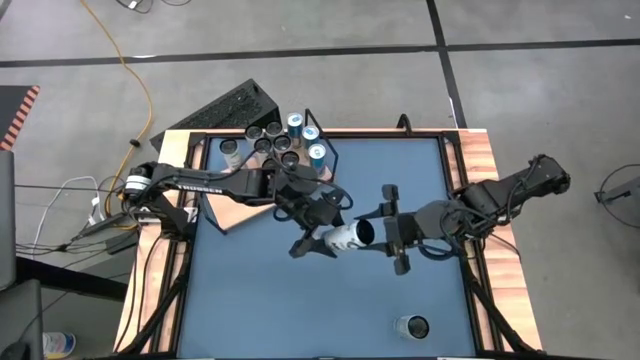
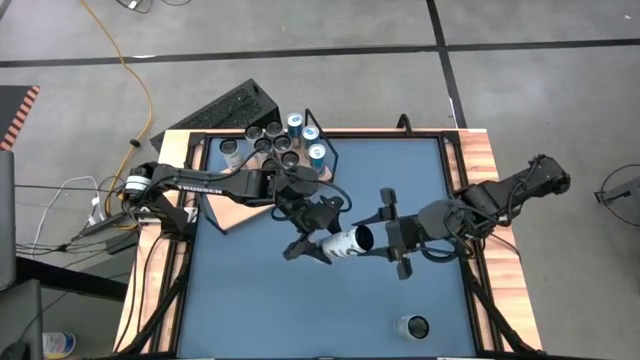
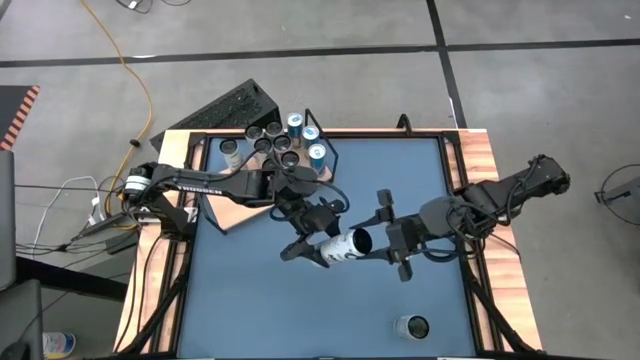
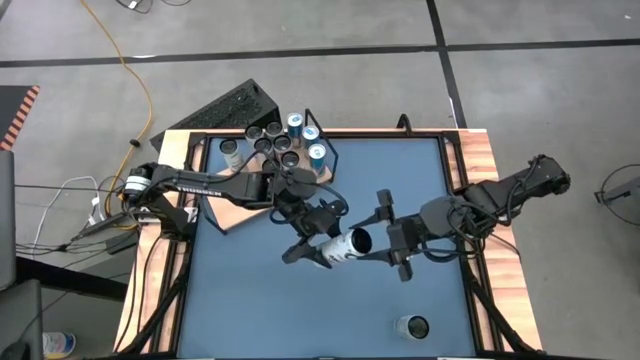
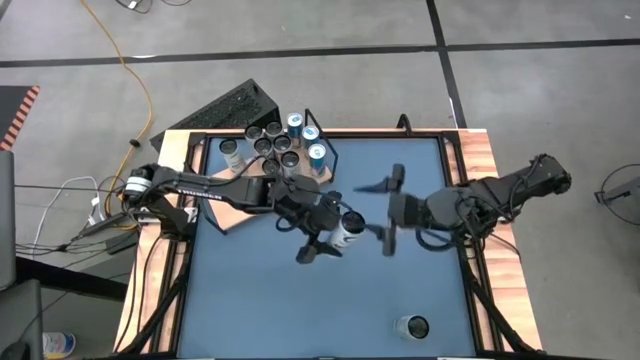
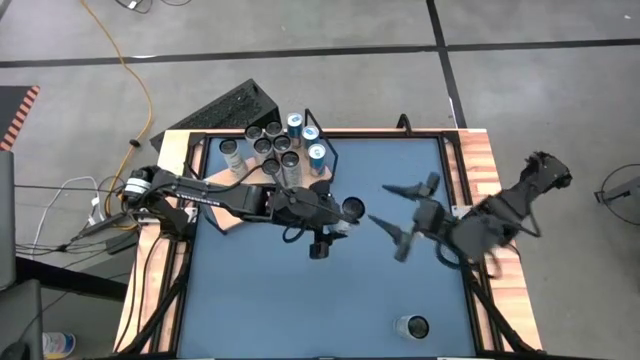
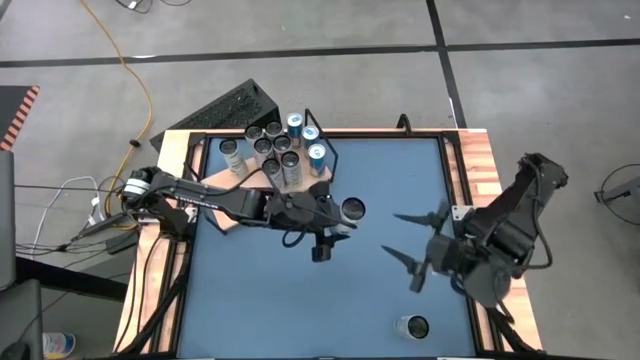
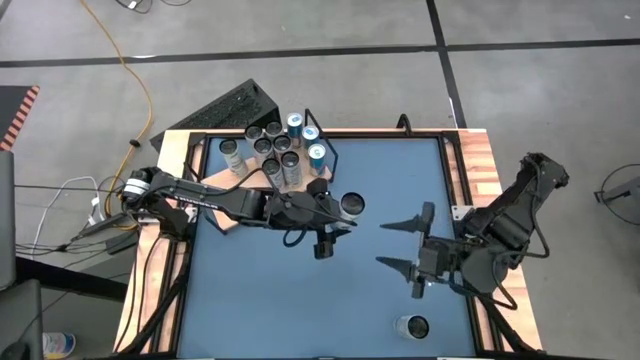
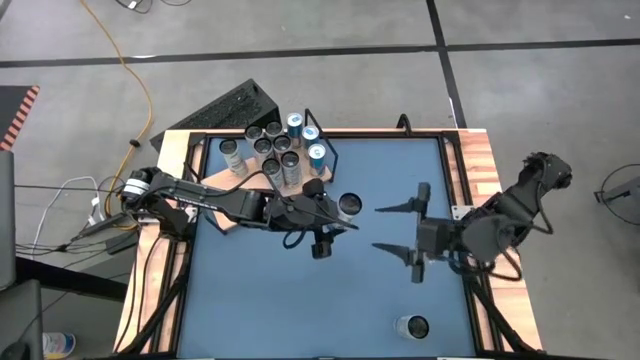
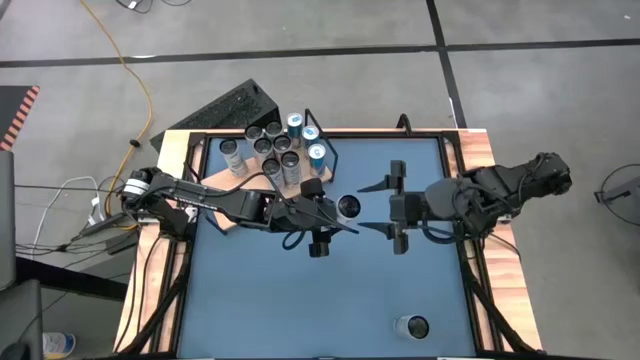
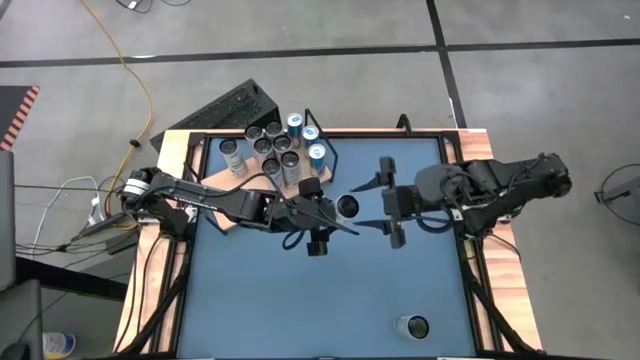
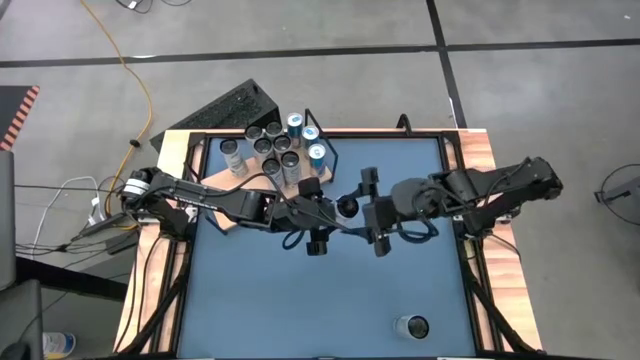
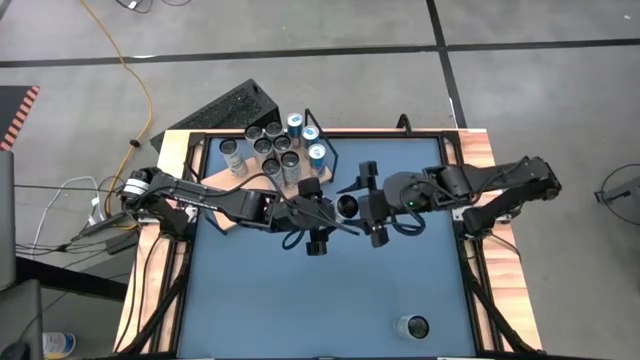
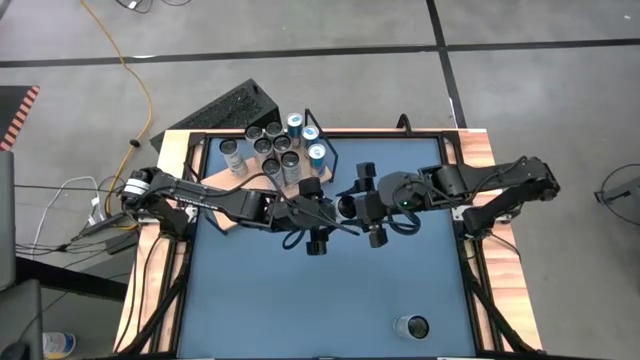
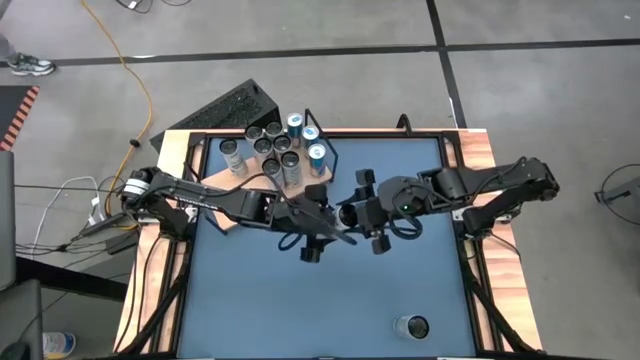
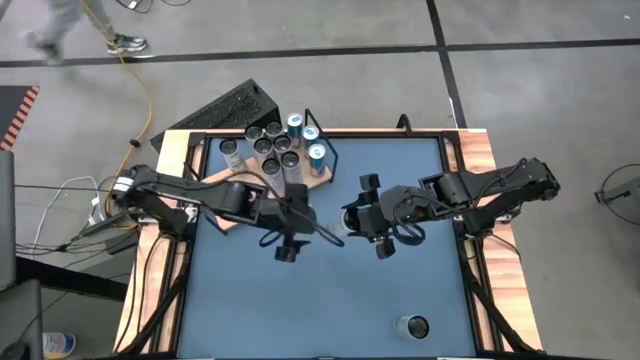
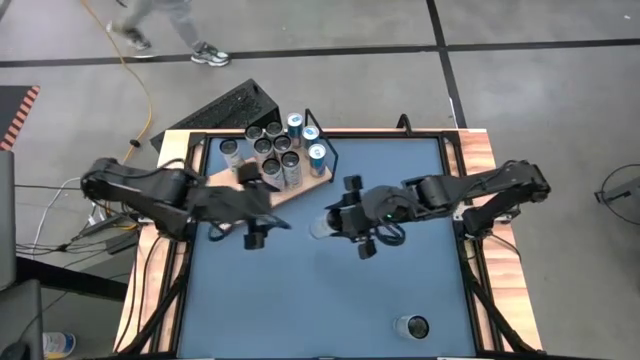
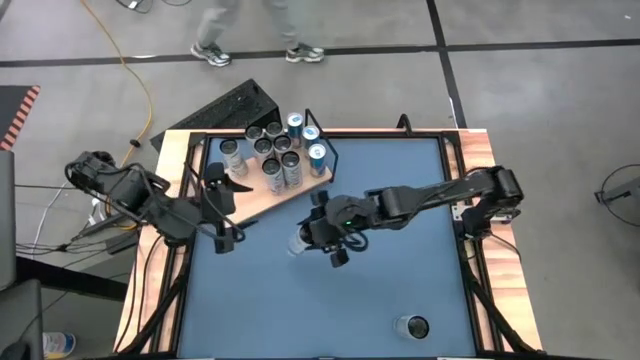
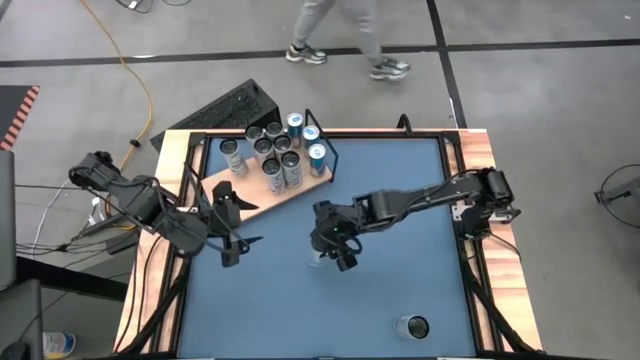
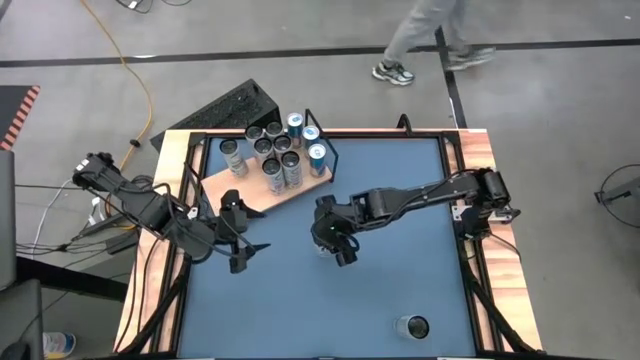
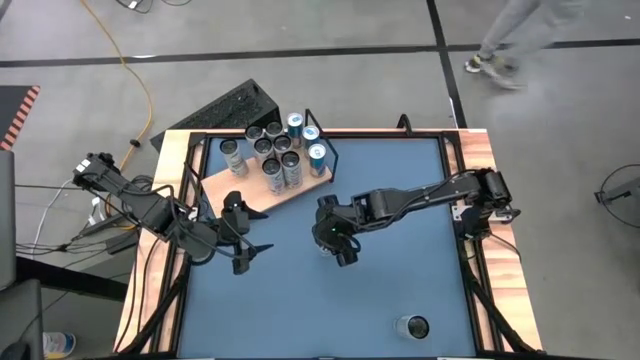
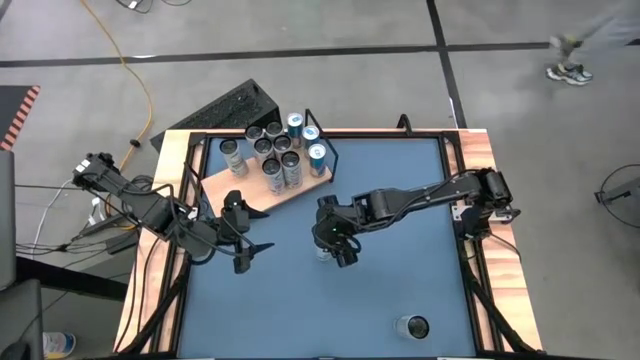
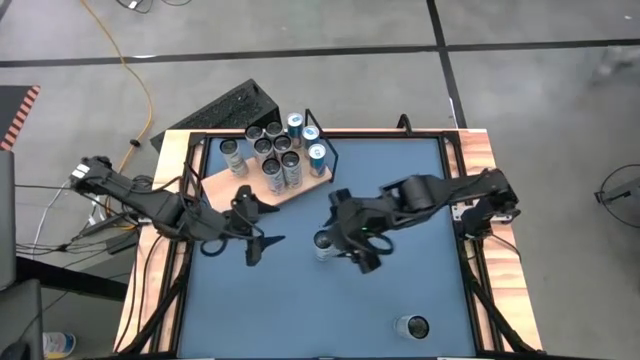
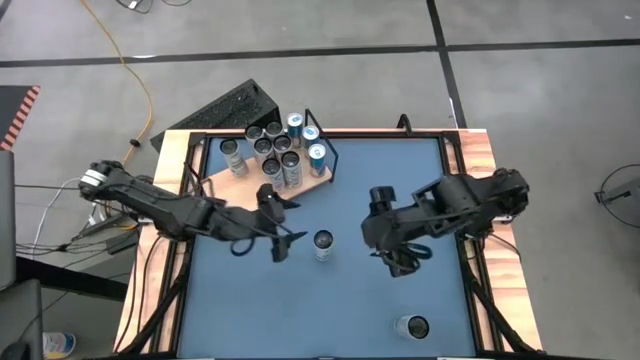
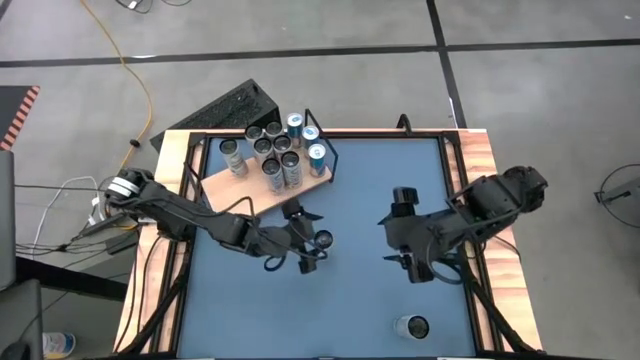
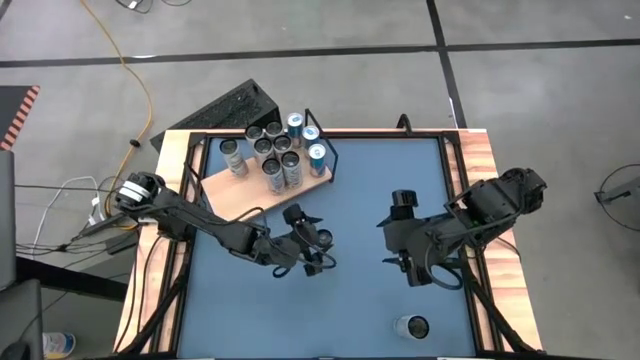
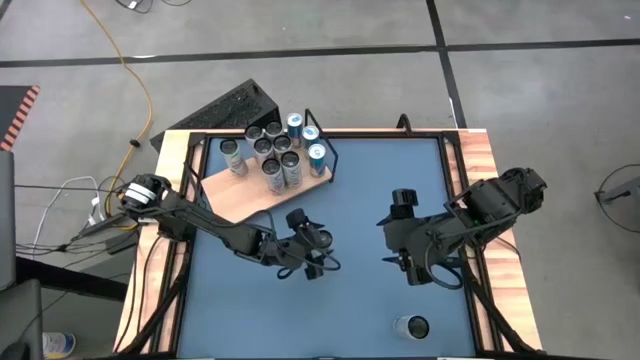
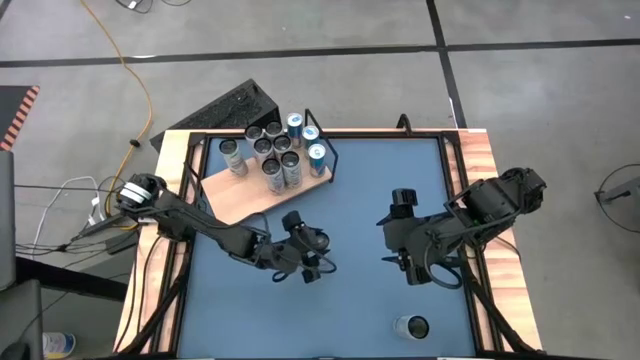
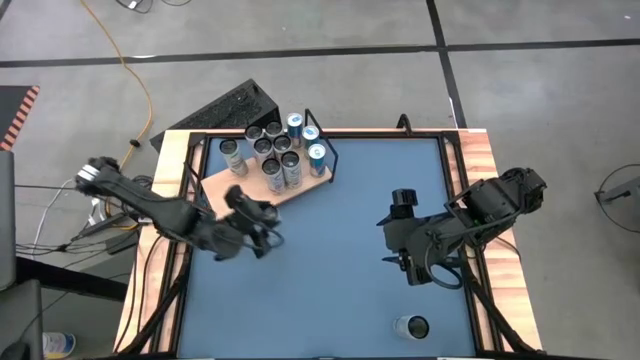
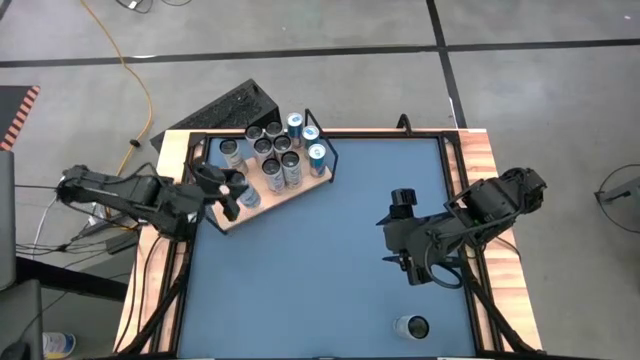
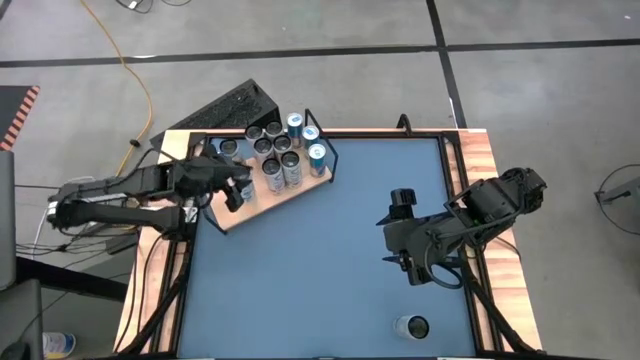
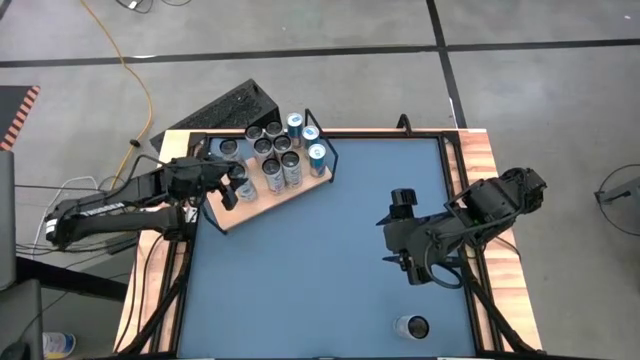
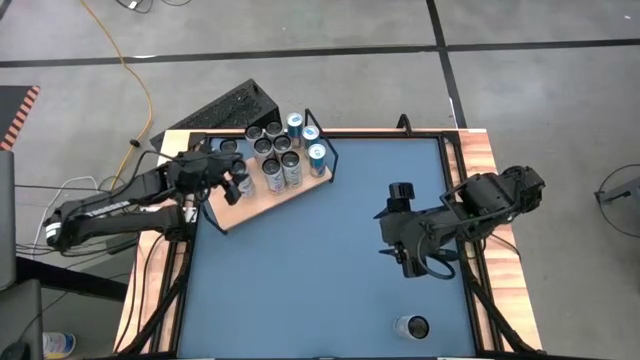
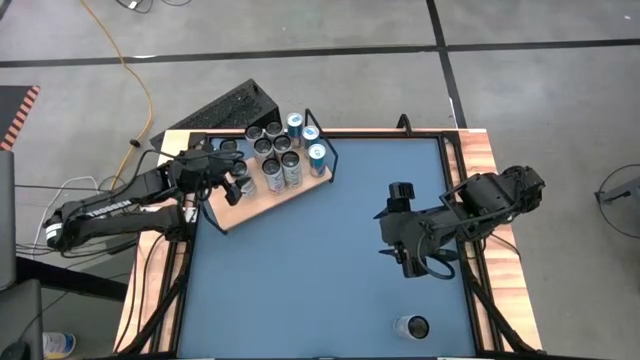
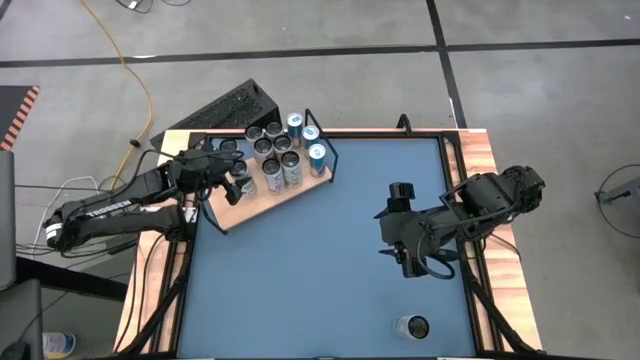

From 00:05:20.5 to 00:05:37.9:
Task: Place canned beverage on shelf
Put the left white and blue soda can on the shelf aligned with the other white and blue soda can

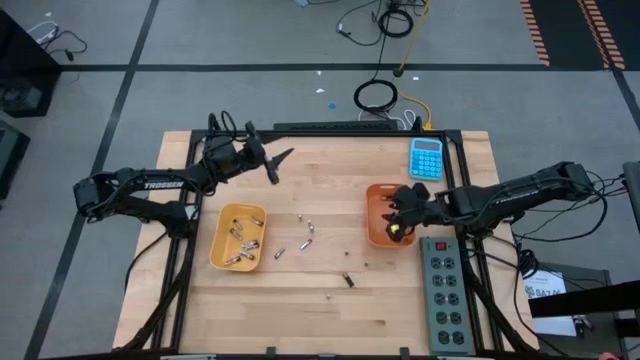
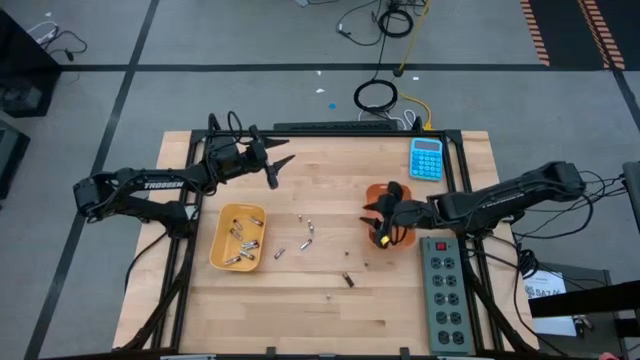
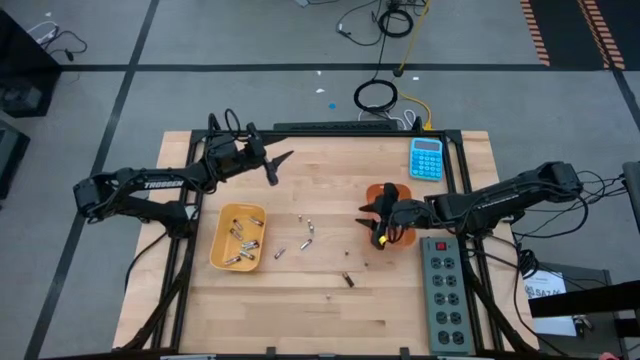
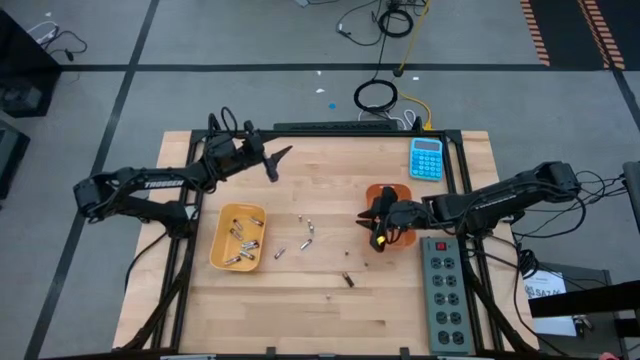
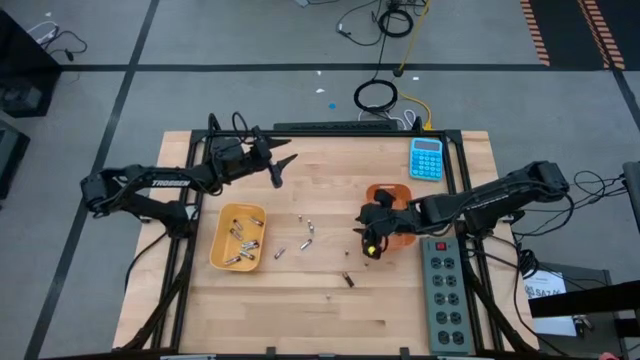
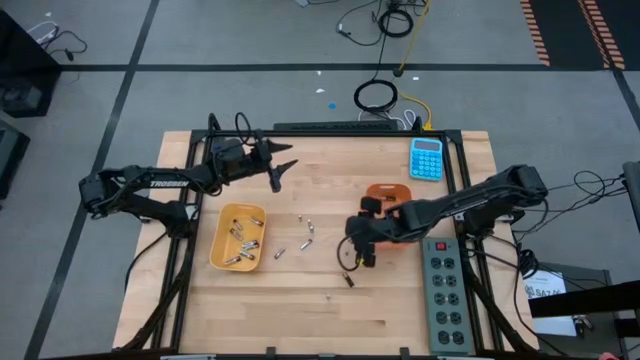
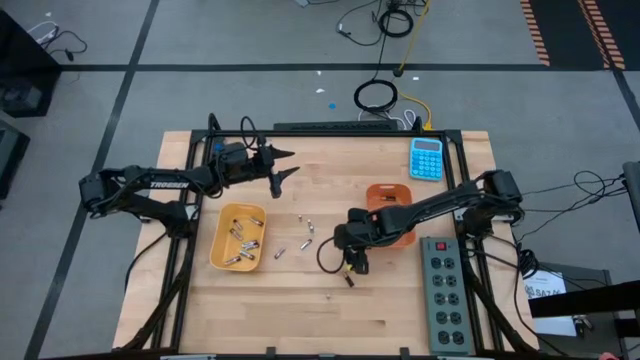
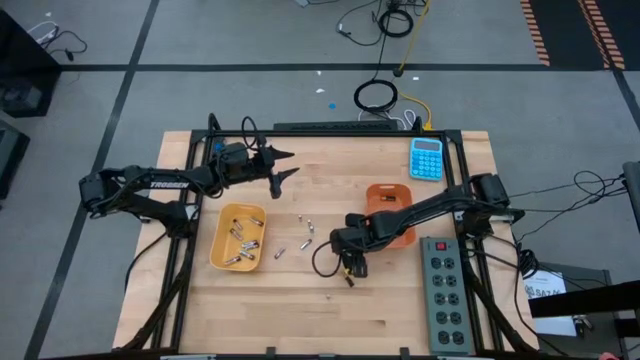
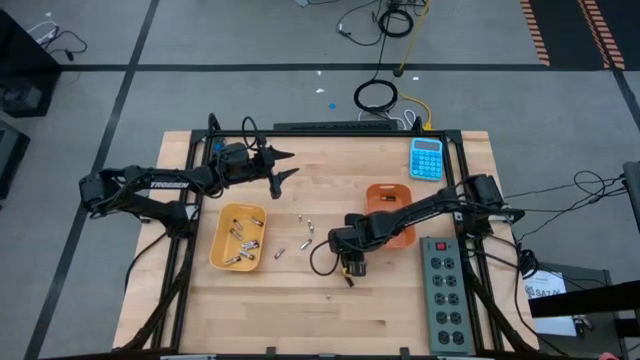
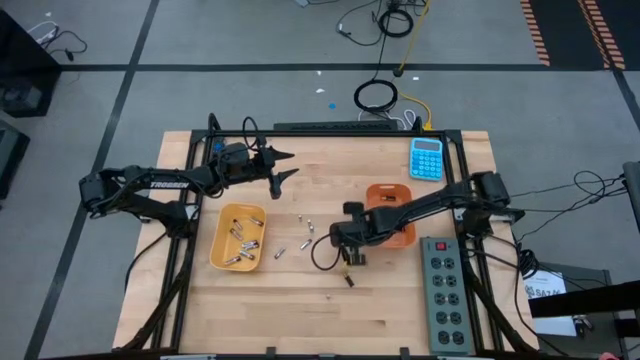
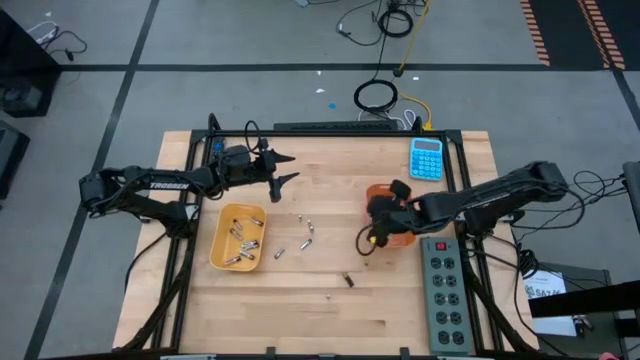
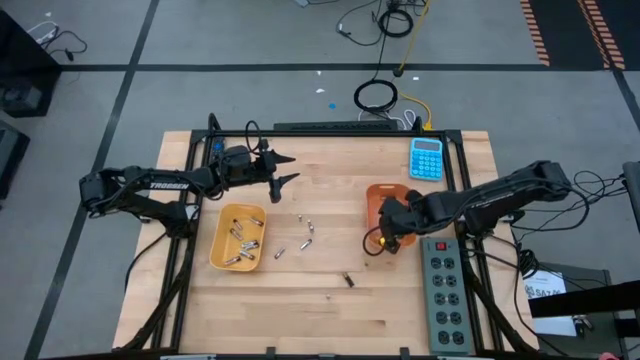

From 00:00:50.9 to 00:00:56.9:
Task: Sort batteries
Put the black-brown battery into the orange bin
